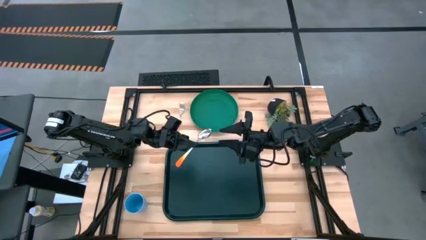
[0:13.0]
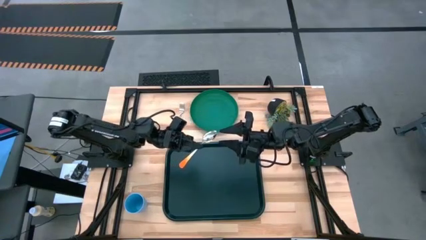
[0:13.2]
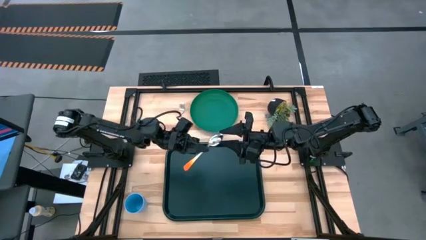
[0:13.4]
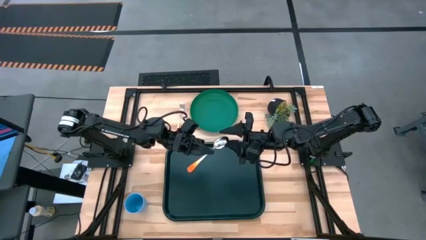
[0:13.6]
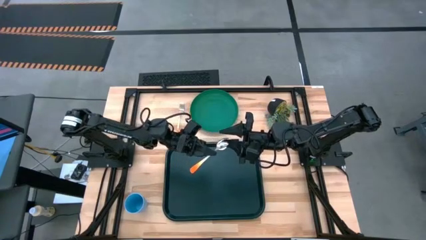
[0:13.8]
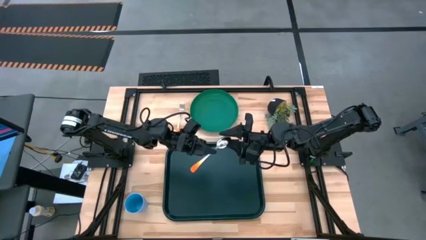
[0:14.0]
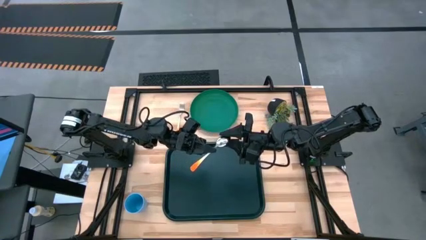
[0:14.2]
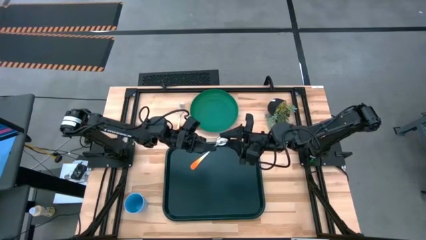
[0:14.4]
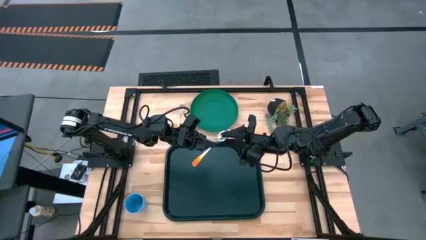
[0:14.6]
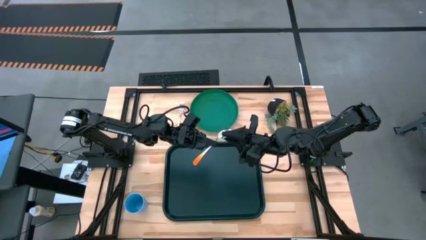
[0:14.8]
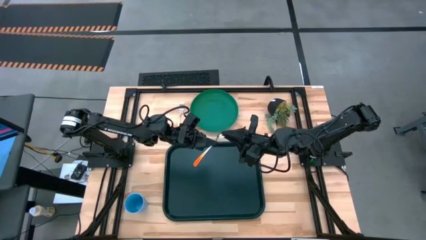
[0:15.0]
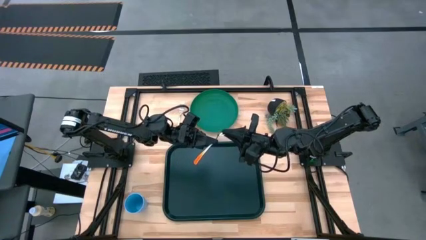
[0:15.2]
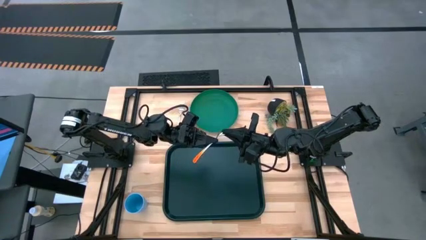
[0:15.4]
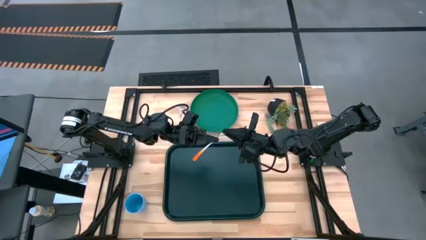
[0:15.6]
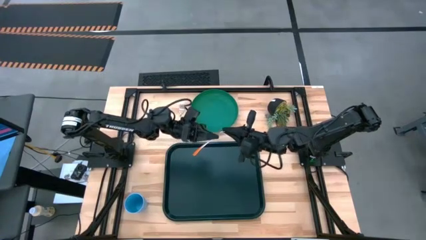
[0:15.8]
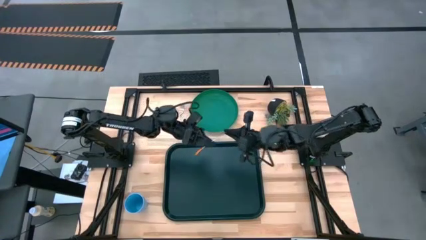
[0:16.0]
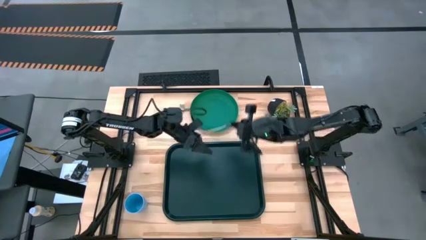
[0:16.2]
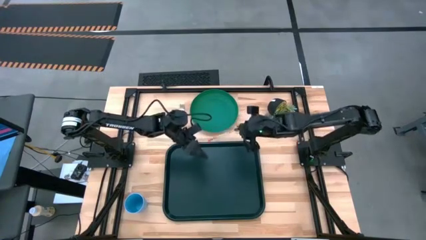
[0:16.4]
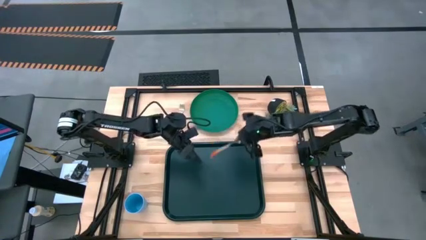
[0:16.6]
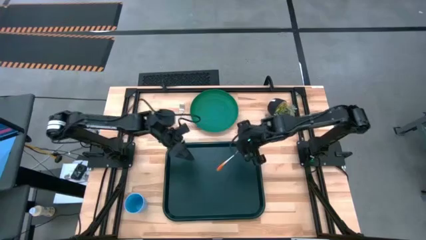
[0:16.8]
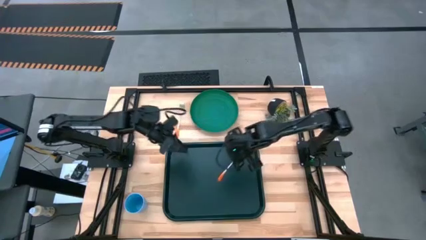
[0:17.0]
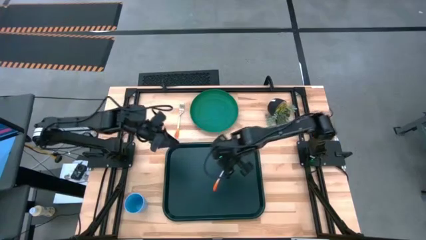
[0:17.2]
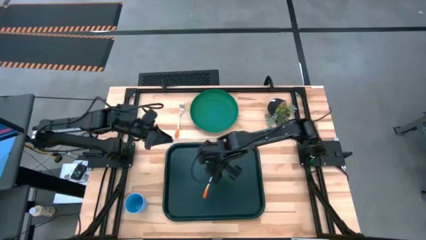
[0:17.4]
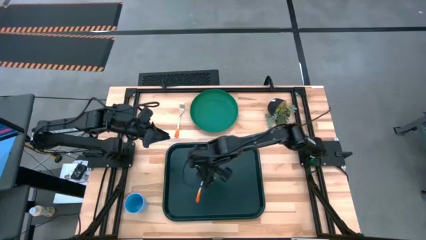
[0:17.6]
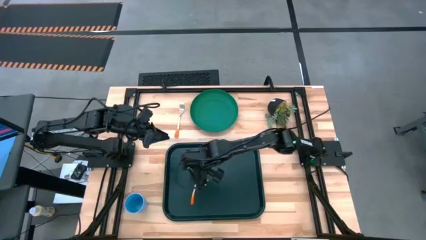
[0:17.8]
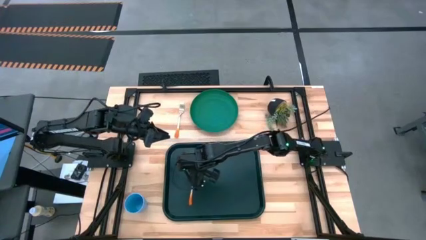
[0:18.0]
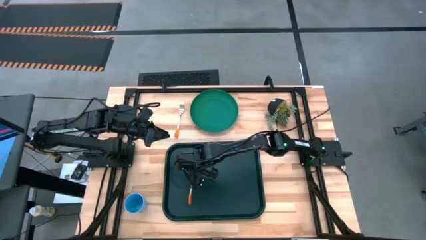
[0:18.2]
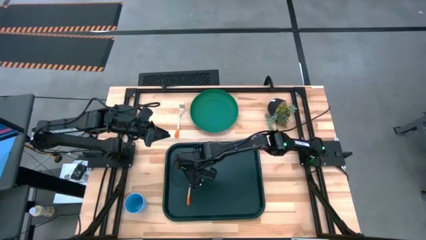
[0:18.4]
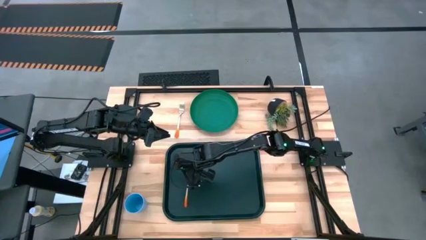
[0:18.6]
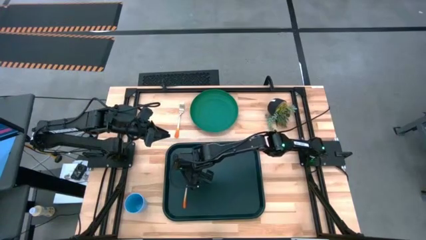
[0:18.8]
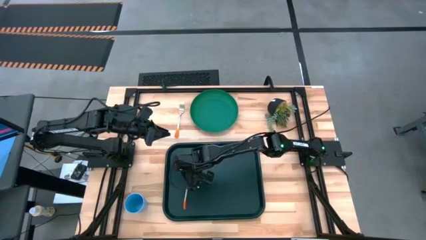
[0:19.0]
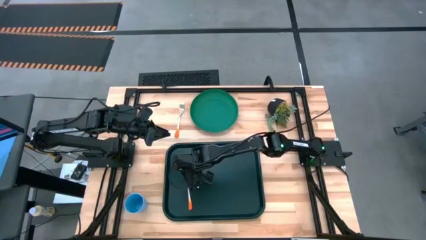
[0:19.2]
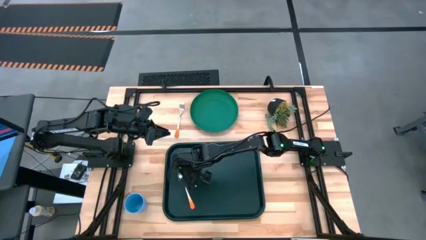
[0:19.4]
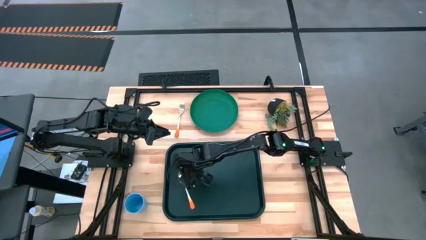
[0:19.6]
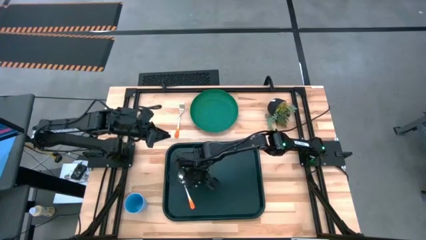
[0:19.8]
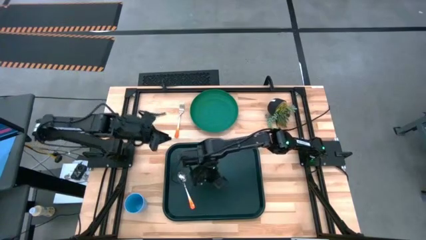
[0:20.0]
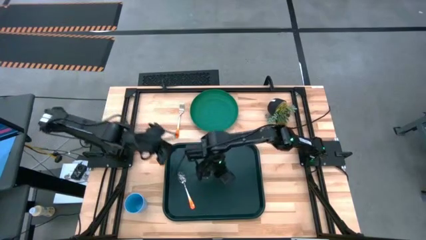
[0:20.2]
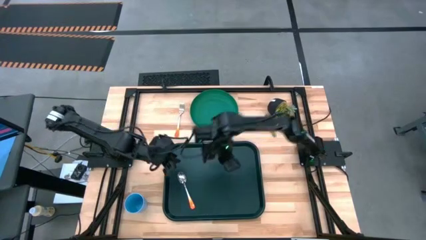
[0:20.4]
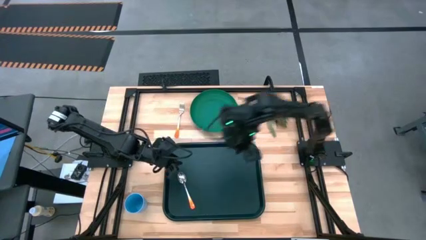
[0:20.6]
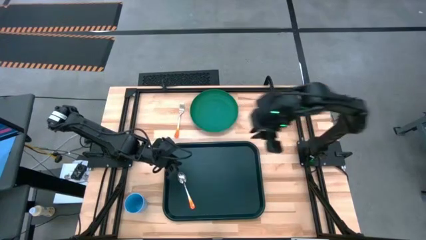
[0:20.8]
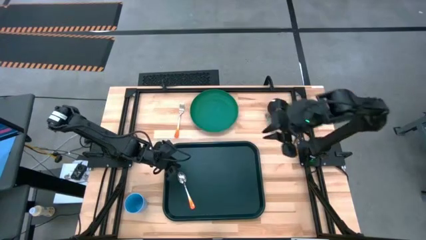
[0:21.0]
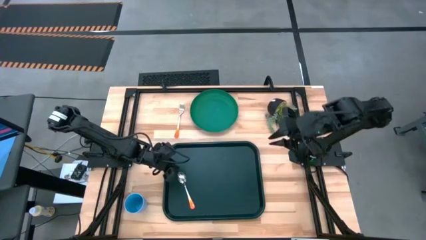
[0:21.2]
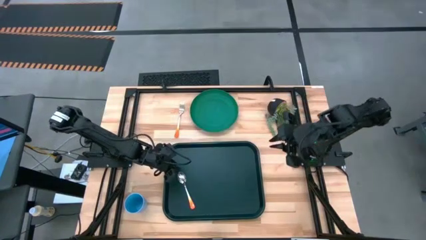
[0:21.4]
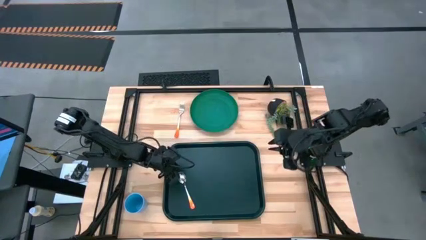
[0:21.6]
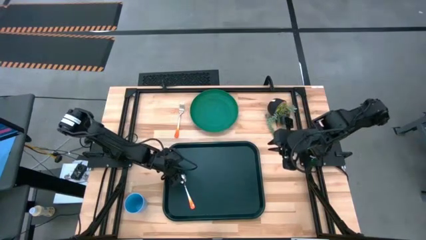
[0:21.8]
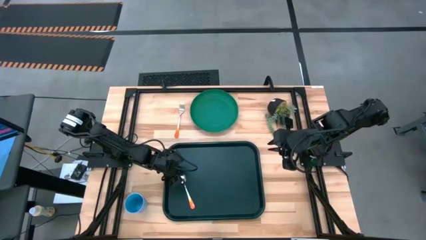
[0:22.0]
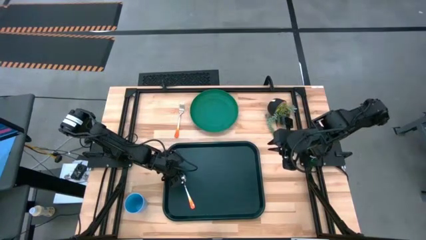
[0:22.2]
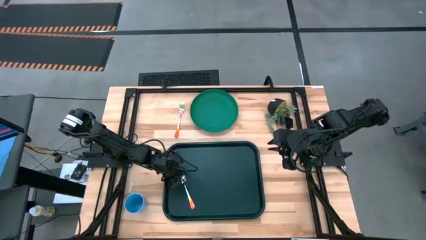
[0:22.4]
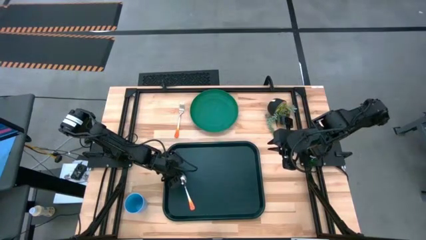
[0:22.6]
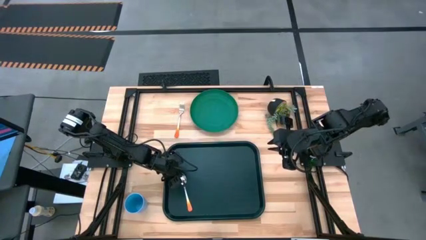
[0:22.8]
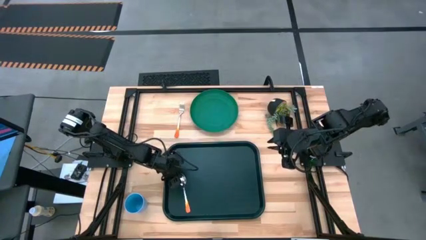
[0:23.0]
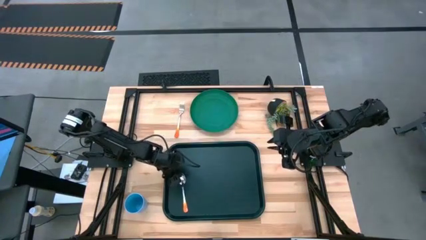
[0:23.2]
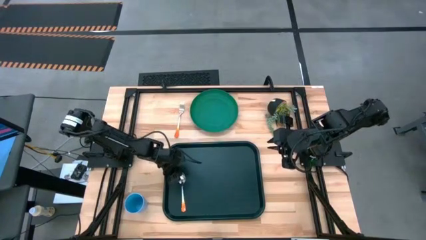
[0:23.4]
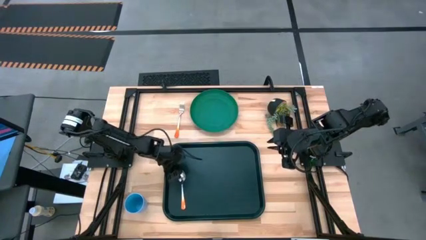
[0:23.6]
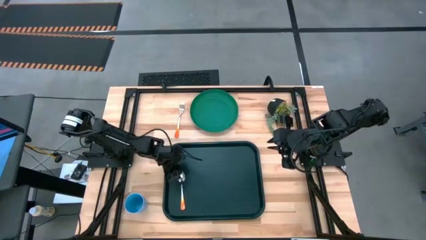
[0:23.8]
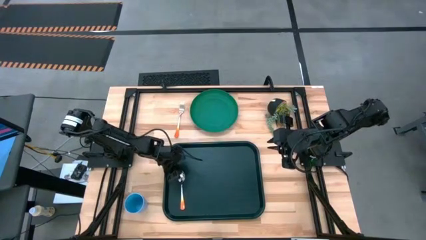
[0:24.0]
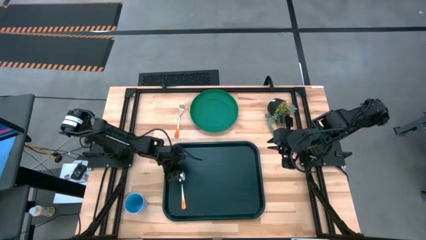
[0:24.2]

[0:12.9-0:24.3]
Task: Pick and place plate/cup/fork/spoon on tray
Put the orange spoon on the black tray to the left

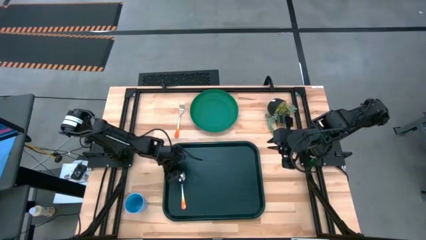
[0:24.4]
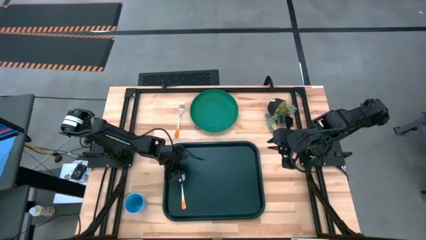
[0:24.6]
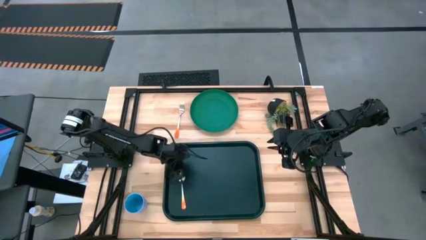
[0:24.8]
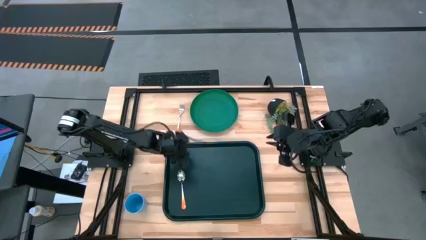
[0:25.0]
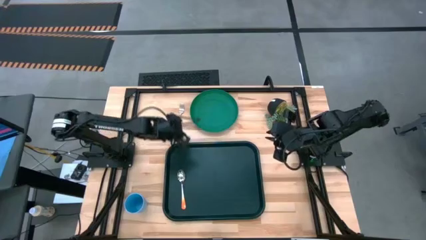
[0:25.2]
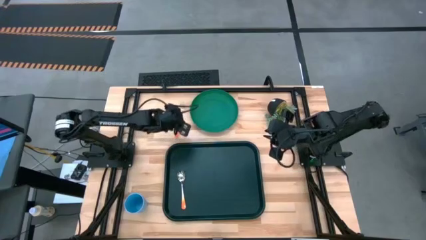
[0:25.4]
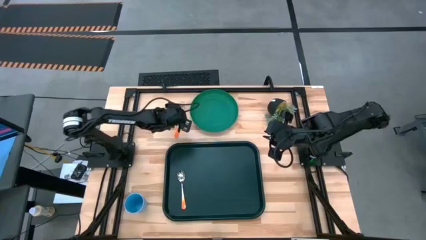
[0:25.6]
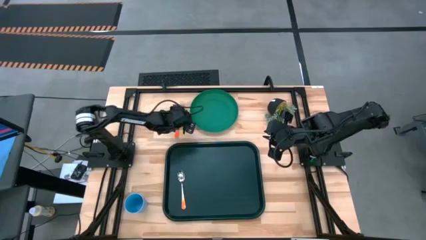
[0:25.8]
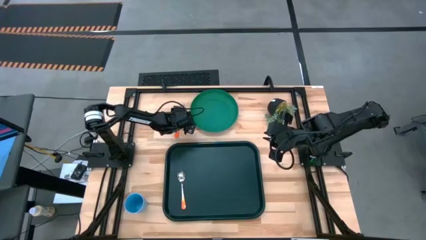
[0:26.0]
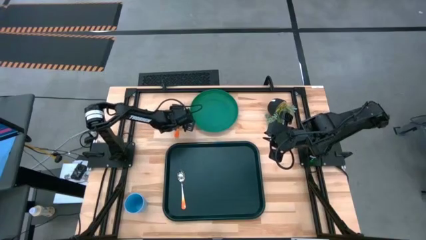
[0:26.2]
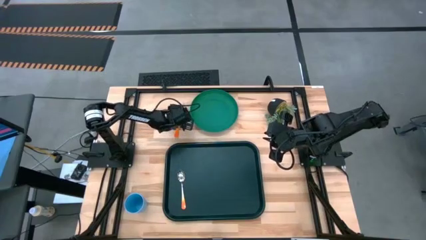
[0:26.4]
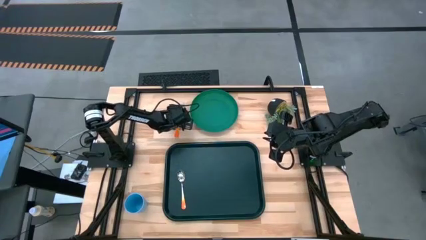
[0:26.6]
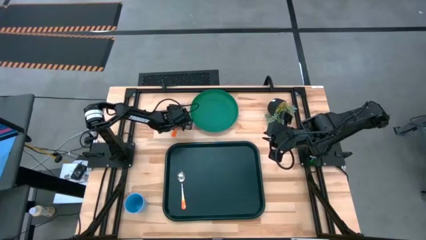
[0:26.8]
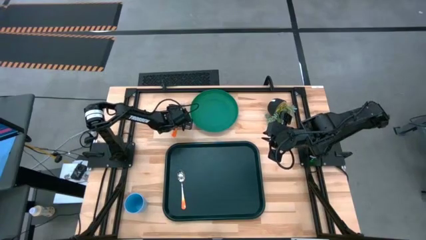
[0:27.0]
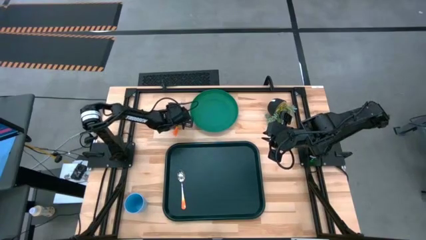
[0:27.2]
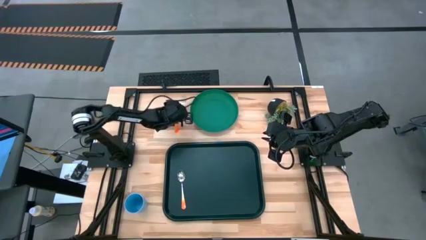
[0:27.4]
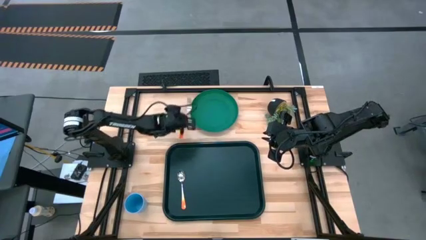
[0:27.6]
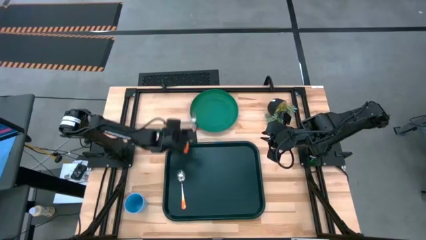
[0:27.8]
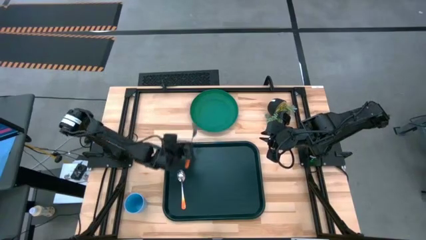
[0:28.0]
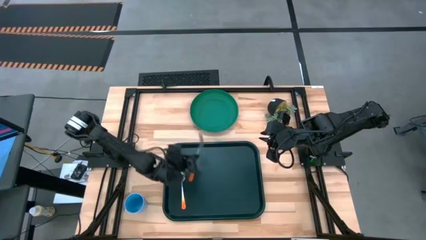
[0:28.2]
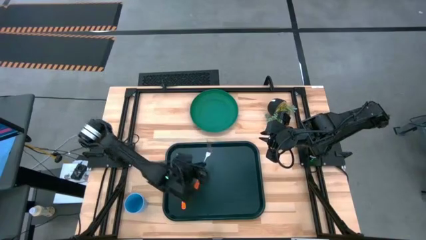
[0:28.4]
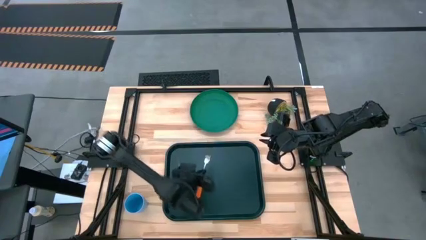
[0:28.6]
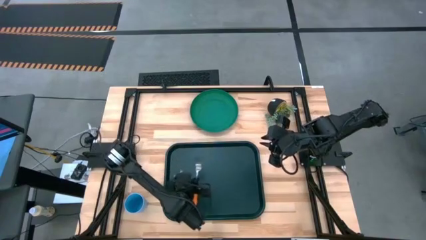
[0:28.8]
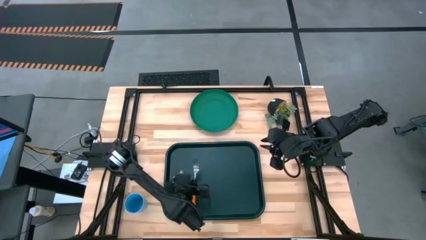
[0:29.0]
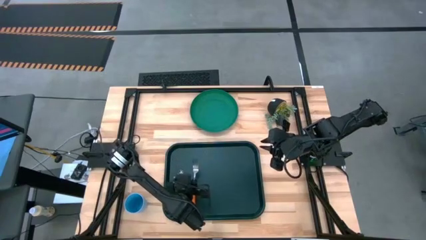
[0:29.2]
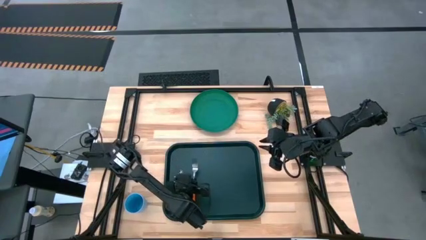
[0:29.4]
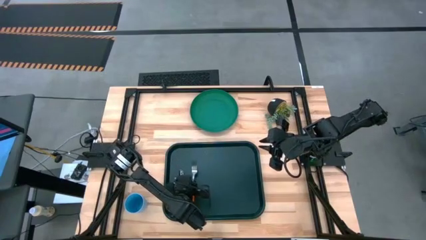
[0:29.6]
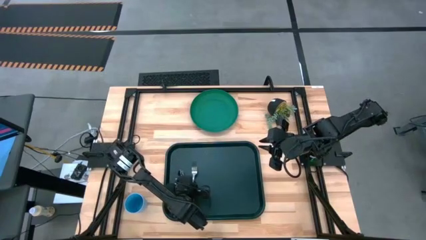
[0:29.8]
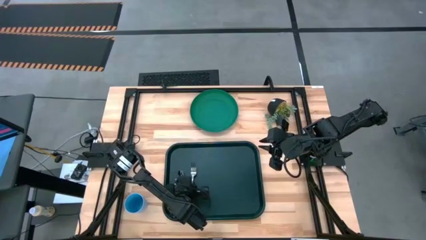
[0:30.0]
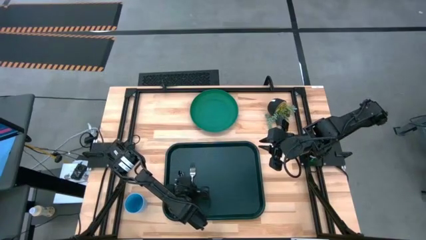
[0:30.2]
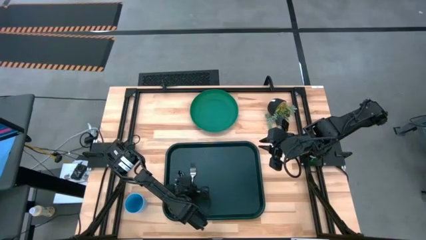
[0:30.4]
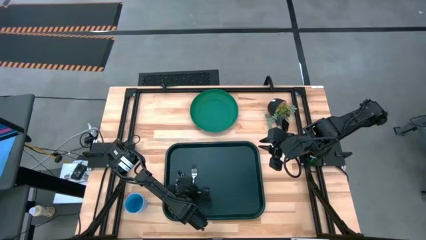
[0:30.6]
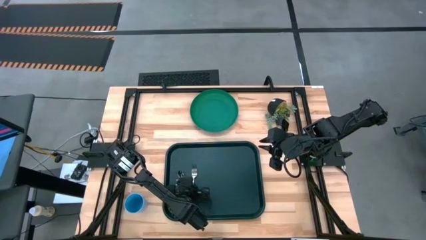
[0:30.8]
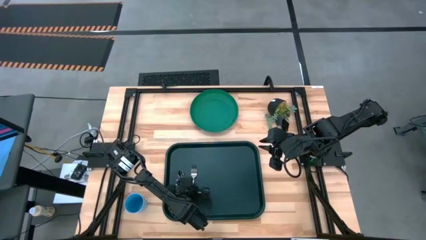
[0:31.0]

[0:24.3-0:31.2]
Put the orange fork on the black tray to the left of the orange spoon
